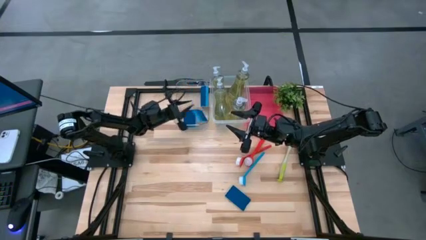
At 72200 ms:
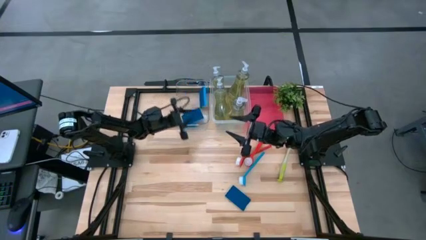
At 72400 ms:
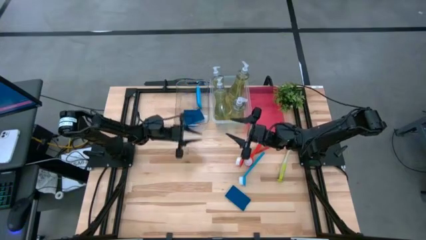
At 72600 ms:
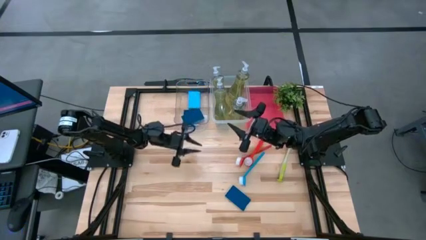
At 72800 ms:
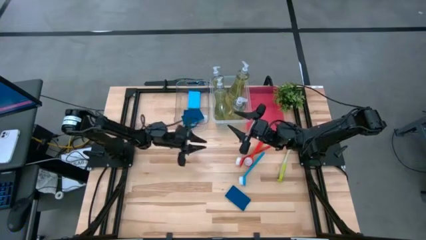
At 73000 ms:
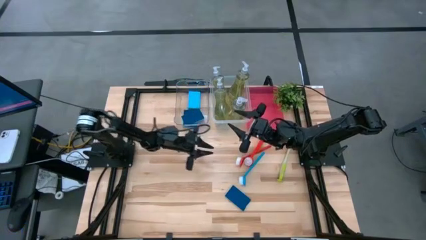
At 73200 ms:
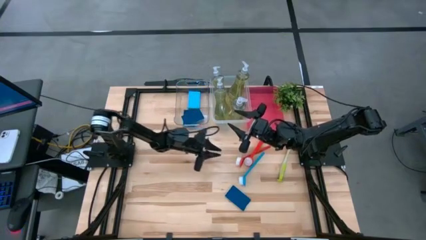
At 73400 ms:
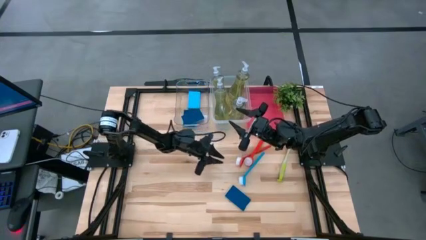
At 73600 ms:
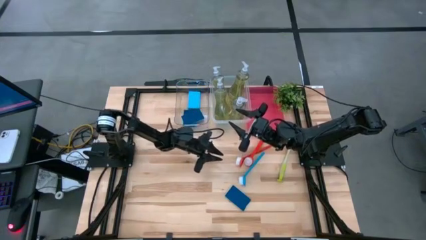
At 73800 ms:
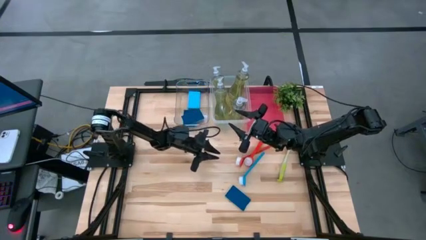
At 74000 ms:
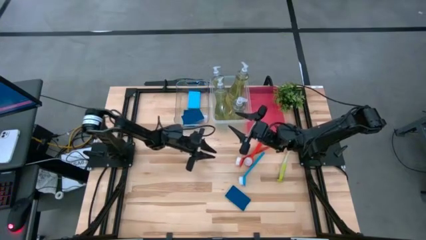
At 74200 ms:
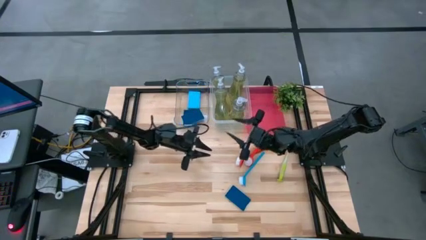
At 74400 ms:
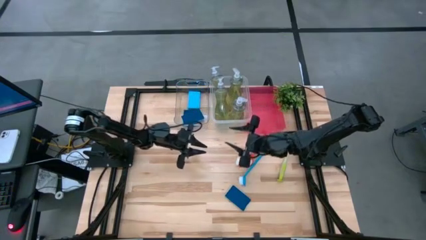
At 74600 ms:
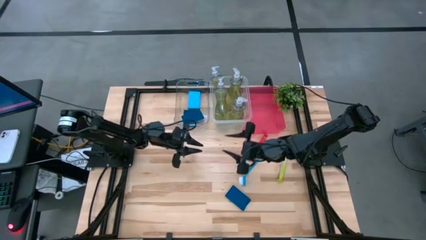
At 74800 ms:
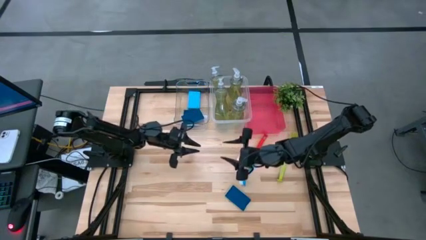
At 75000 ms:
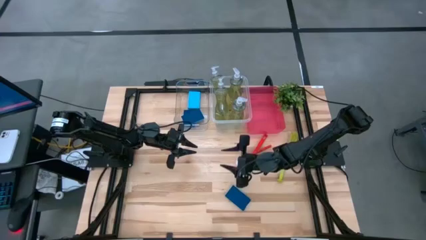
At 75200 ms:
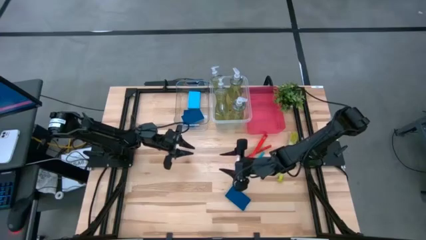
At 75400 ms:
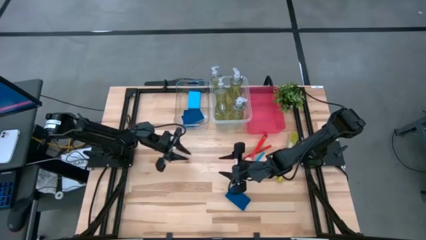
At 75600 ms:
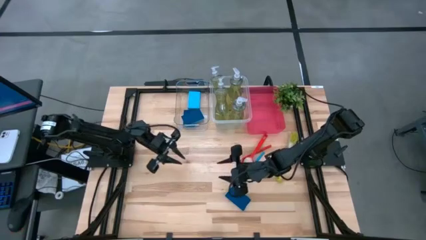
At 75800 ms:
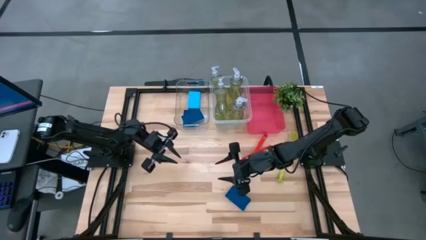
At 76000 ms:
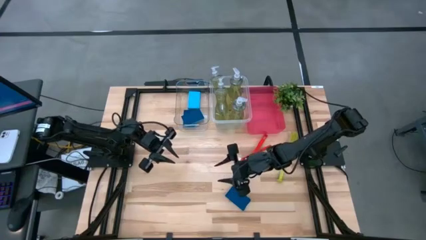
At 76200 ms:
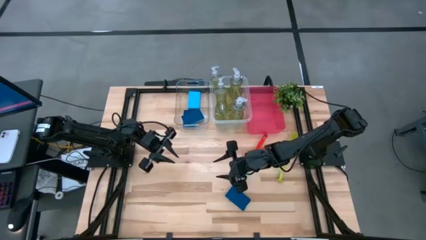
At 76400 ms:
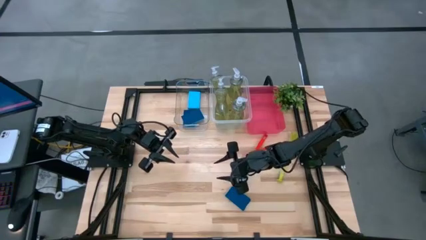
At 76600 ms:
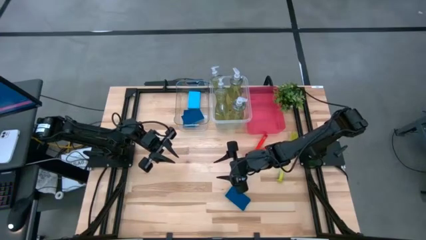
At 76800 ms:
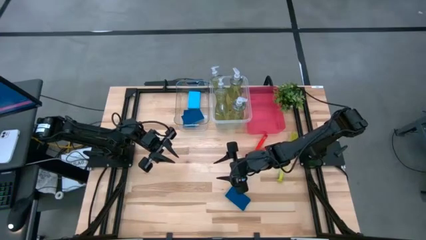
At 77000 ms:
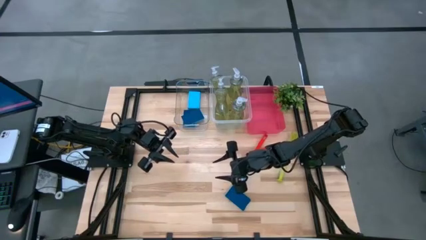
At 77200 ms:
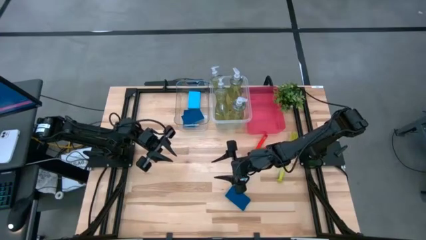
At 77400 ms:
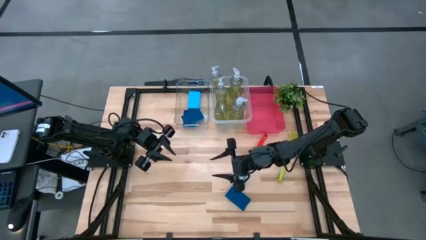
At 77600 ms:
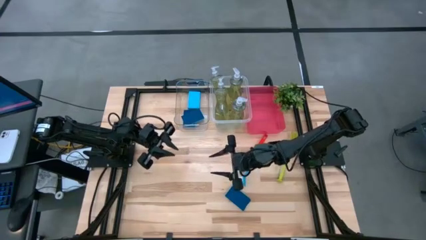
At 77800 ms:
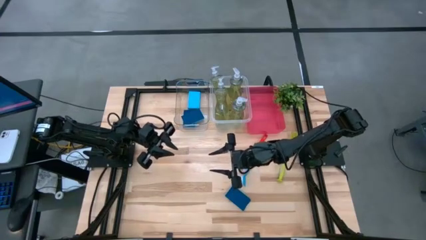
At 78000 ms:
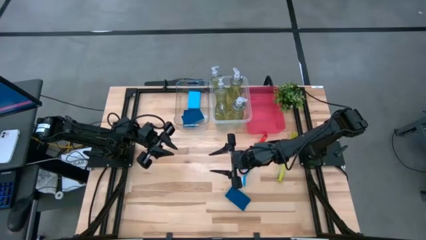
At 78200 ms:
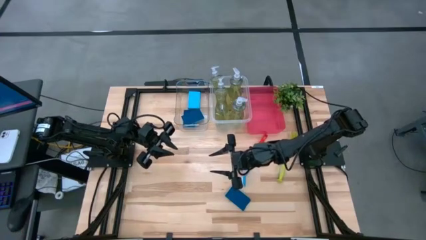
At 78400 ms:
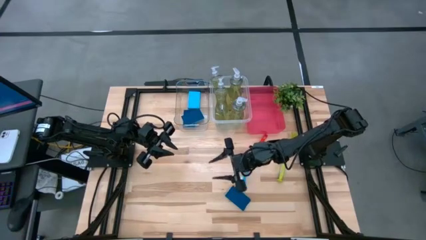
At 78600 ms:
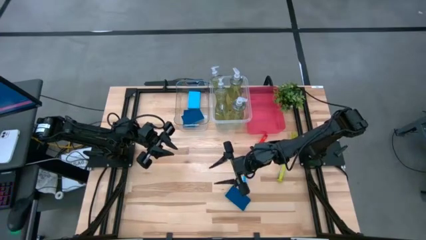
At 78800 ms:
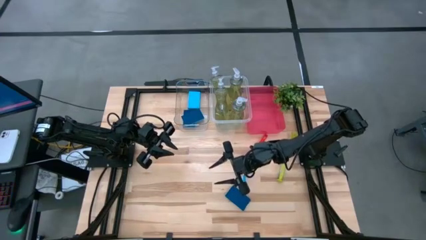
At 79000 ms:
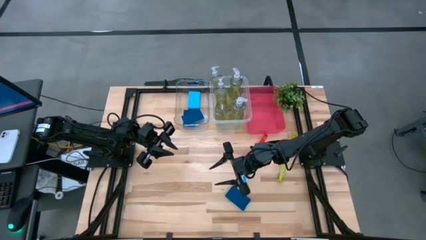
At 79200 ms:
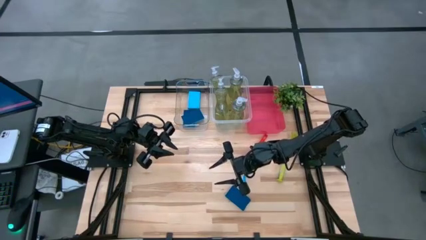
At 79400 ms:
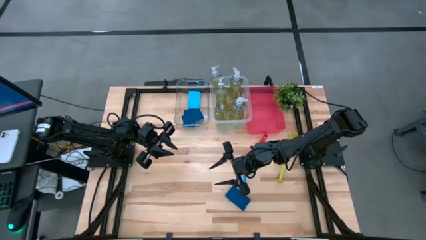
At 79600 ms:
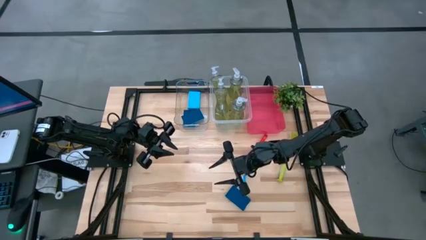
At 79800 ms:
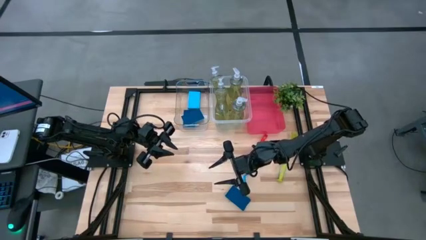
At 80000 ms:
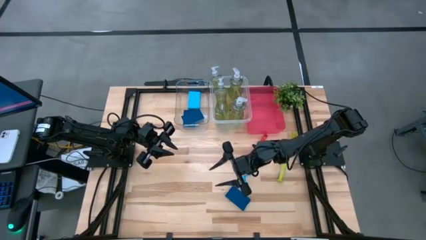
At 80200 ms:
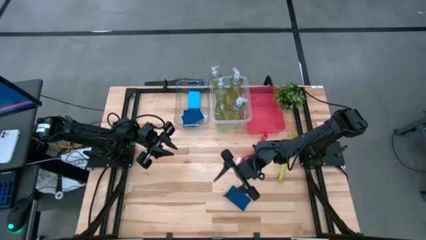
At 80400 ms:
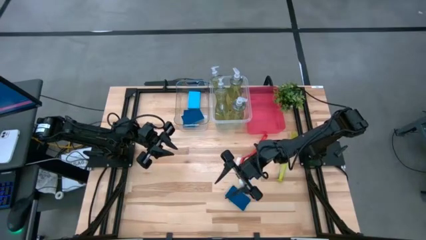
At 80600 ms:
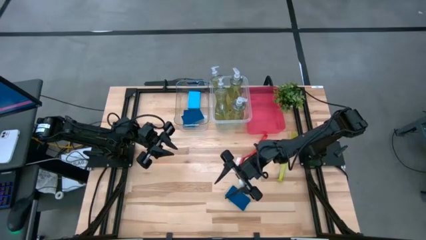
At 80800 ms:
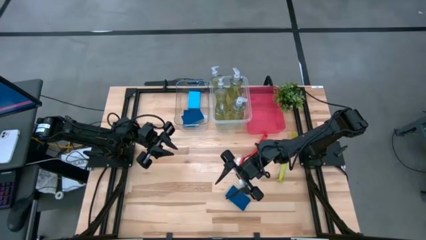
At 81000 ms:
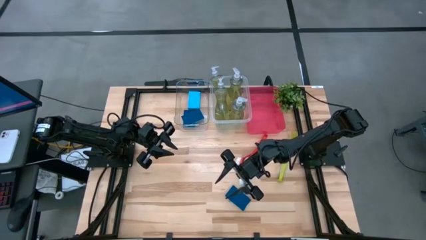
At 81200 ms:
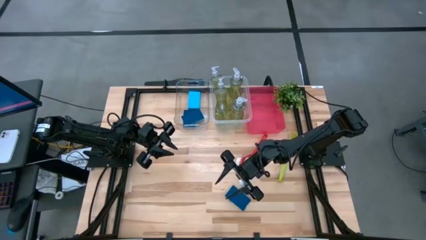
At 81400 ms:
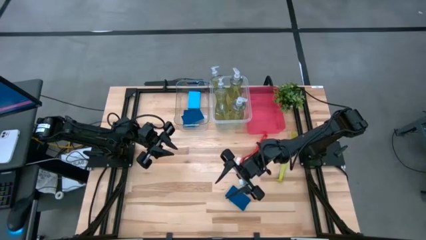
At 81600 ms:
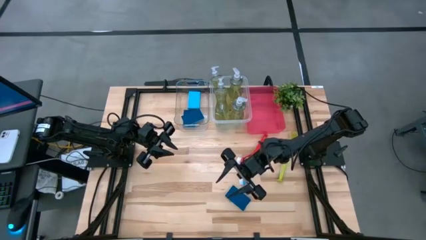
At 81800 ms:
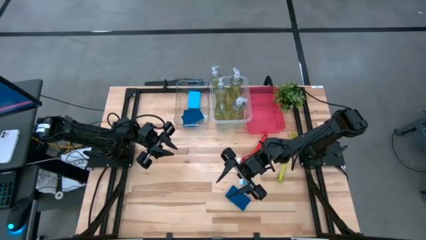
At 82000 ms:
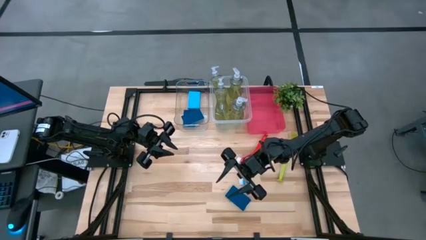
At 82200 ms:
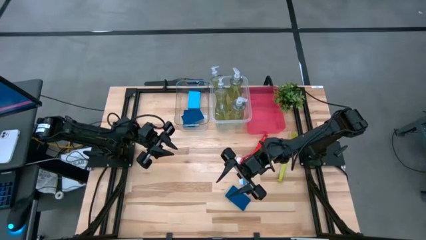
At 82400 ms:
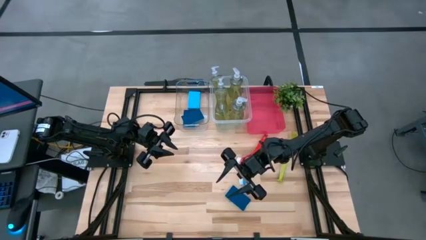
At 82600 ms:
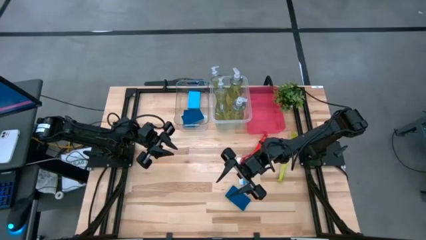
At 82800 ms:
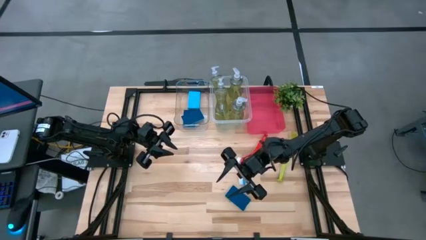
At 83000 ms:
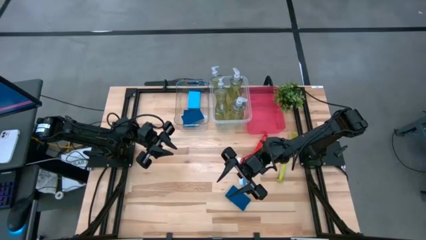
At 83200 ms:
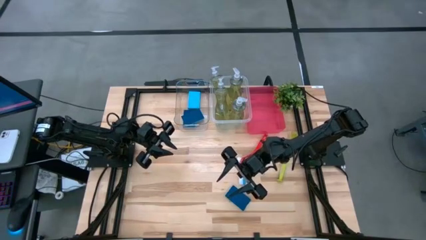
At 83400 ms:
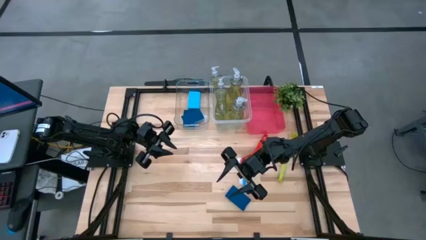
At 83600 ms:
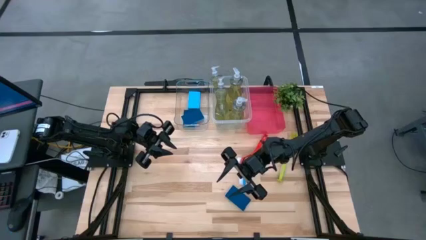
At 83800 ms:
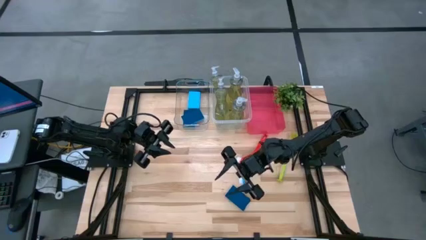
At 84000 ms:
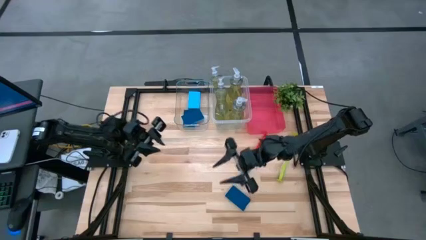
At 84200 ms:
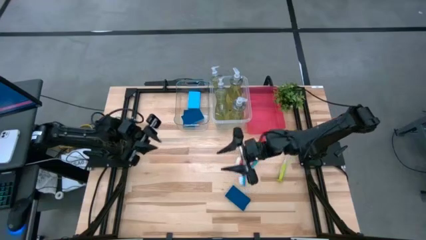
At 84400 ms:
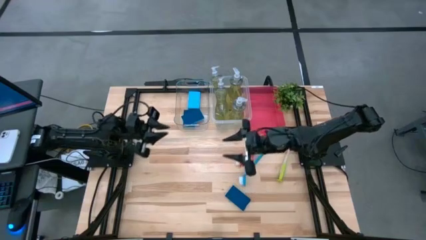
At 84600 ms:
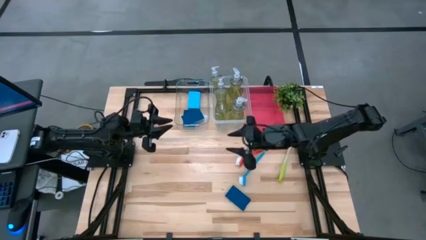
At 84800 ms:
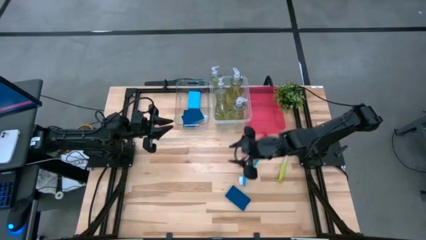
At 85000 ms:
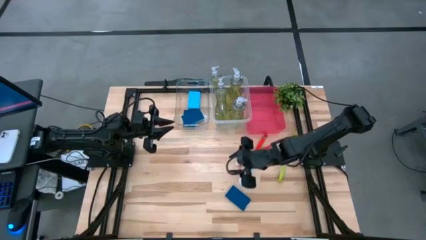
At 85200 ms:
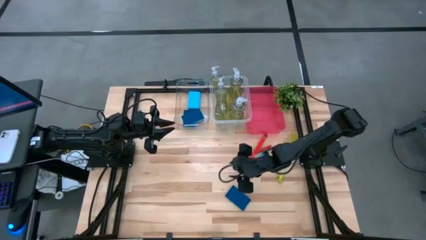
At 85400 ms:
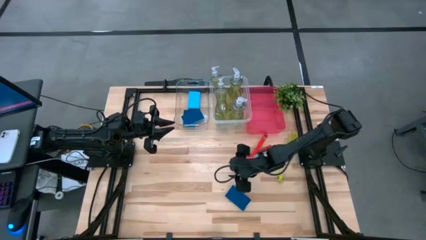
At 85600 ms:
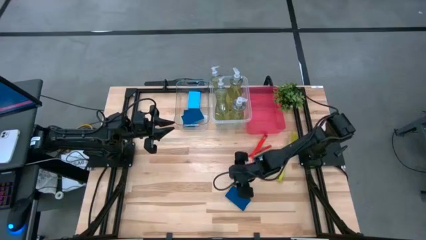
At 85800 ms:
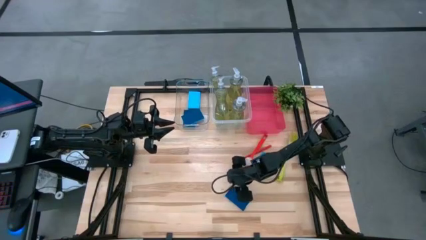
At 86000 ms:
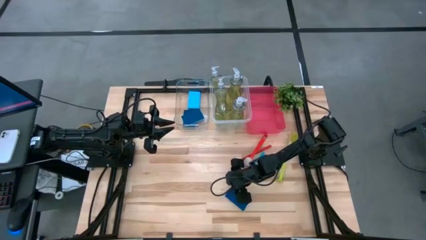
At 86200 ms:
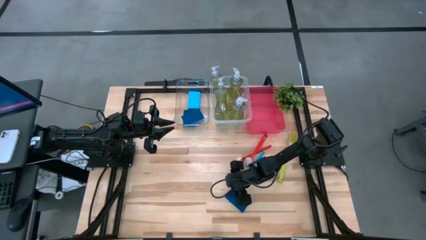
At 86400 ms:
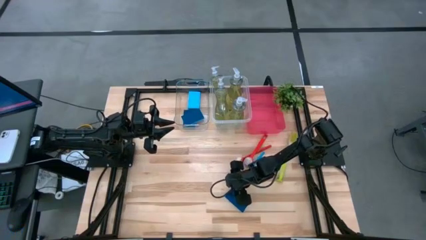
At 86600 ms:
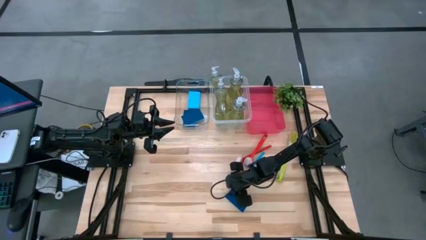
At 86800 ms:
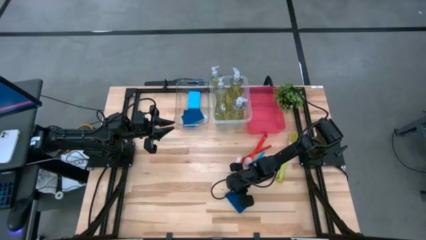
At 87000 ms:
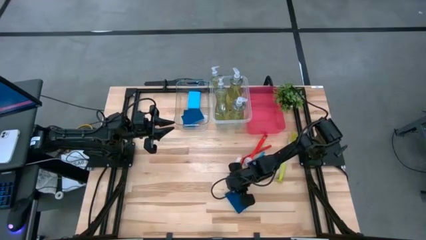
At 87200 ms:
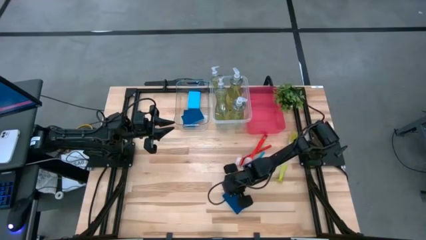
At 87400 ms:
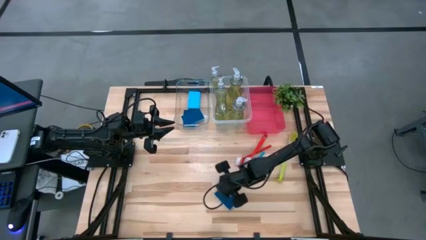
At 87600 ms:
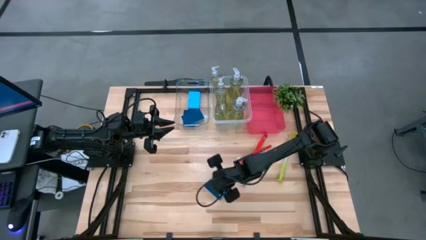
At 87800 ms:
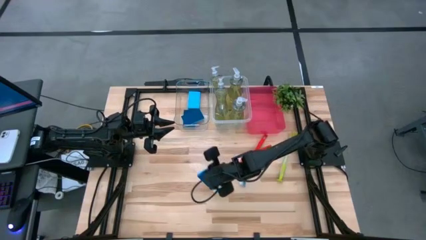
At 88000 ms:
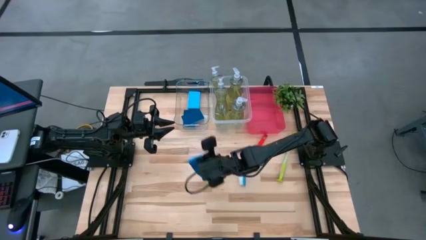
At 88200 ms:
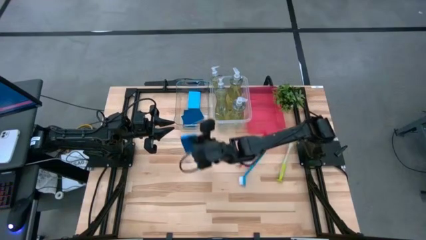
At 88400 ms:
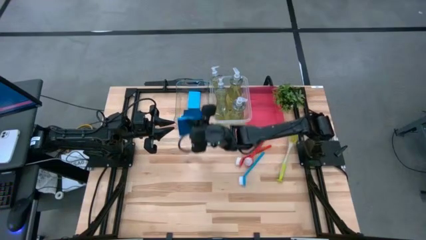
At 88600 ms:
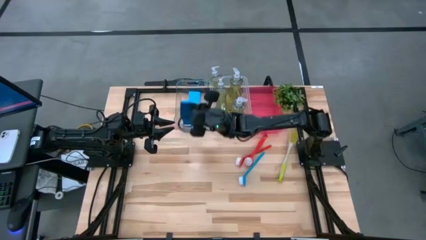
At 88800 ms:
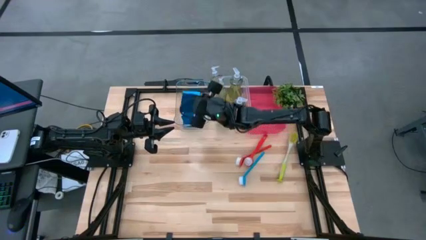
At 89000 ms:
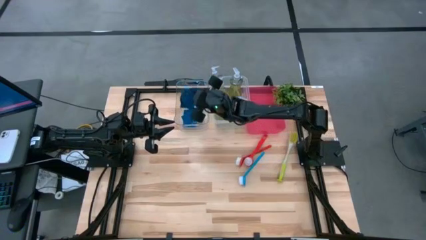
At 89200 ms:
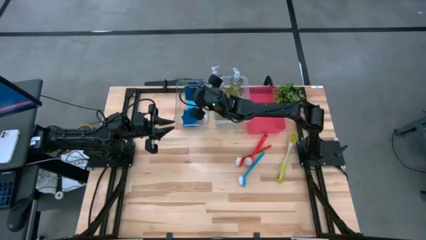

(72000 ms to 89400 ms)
Task: Pick & Place Kitchen Sink Supplies
Put the blue sponge into the left transparent bin
